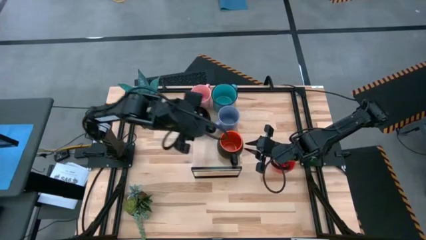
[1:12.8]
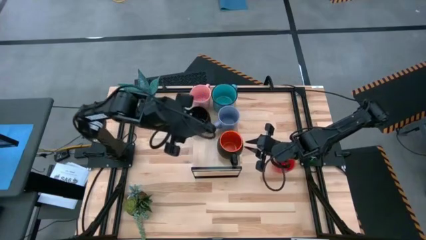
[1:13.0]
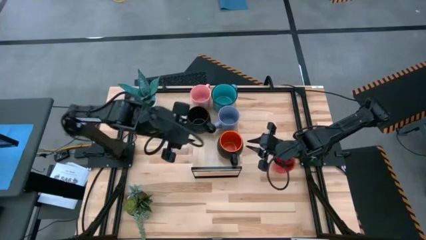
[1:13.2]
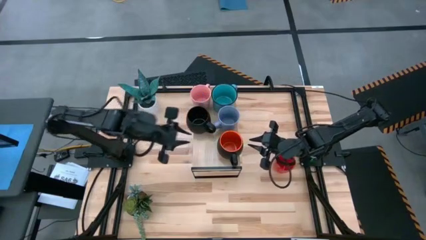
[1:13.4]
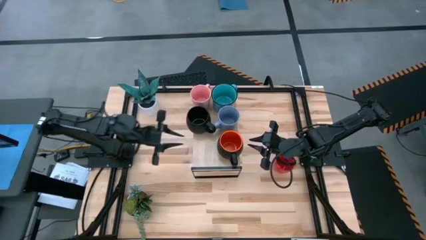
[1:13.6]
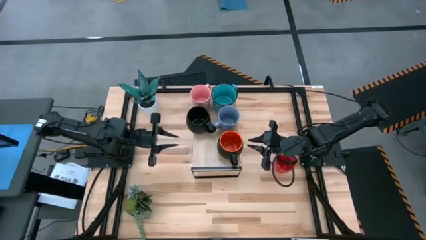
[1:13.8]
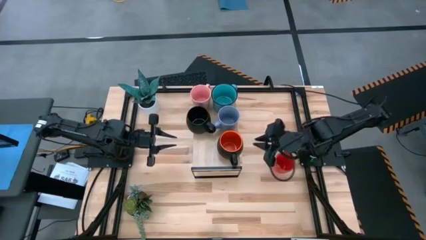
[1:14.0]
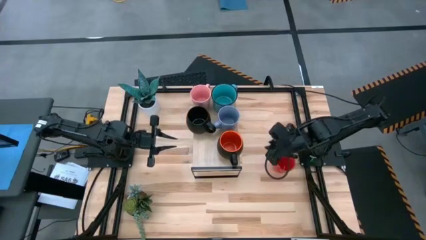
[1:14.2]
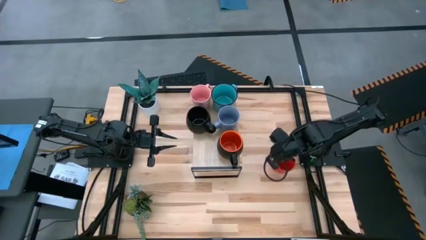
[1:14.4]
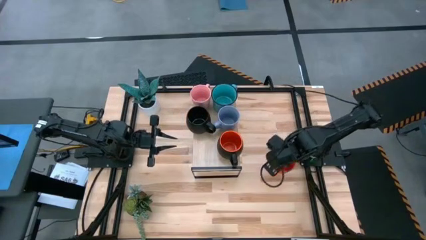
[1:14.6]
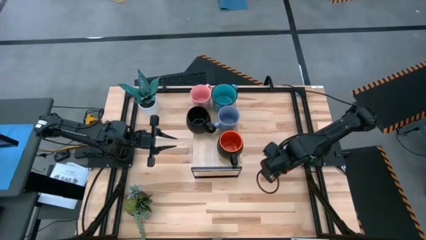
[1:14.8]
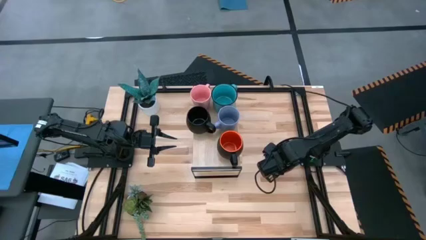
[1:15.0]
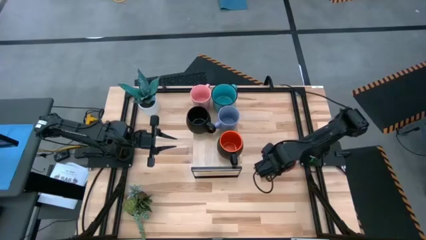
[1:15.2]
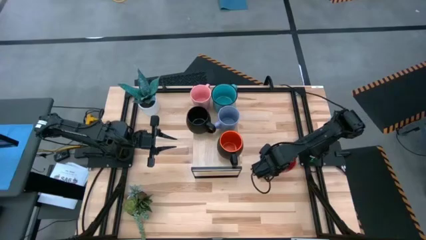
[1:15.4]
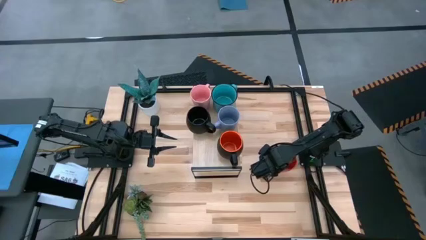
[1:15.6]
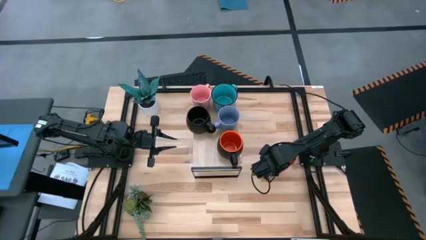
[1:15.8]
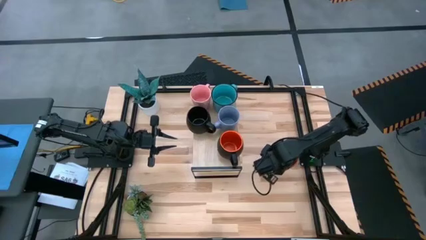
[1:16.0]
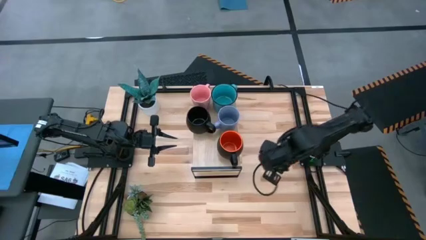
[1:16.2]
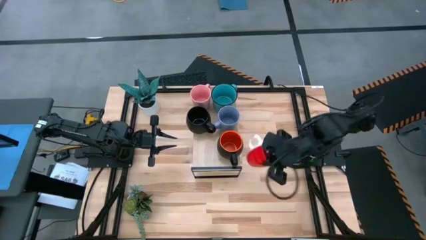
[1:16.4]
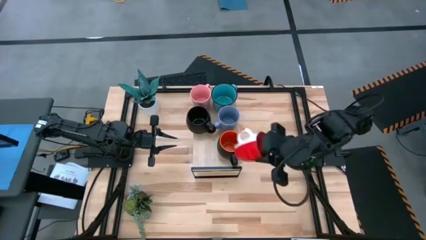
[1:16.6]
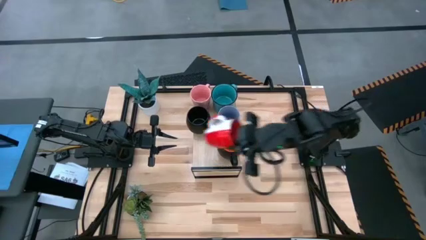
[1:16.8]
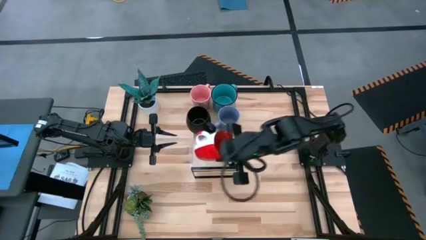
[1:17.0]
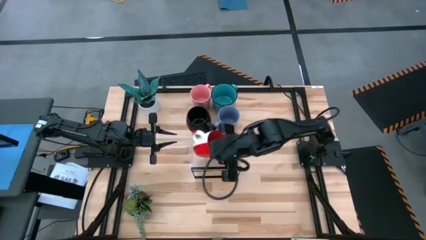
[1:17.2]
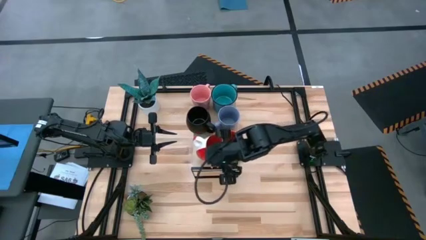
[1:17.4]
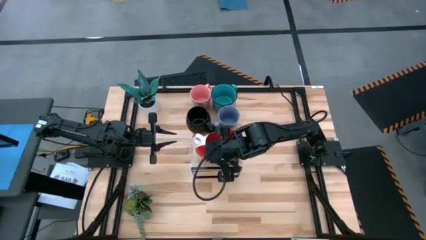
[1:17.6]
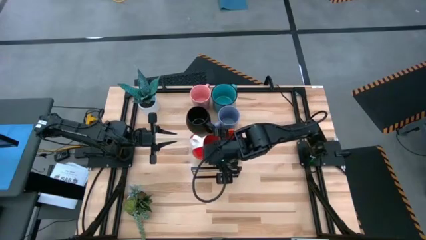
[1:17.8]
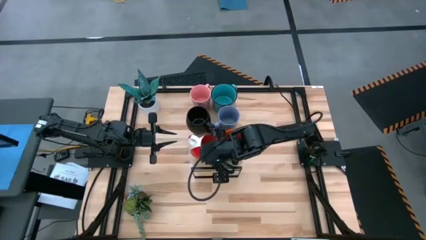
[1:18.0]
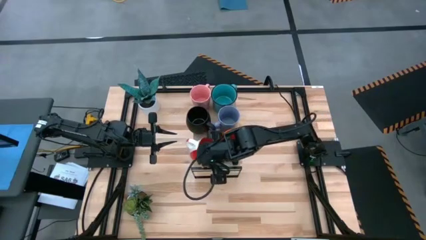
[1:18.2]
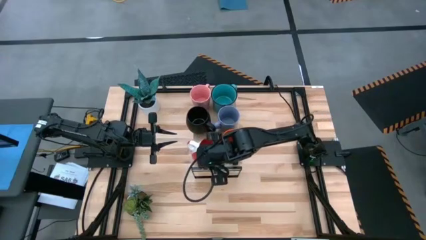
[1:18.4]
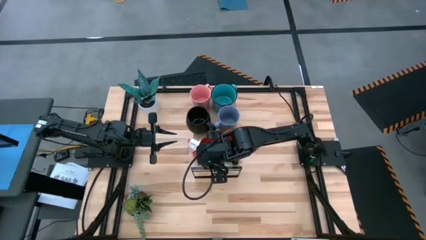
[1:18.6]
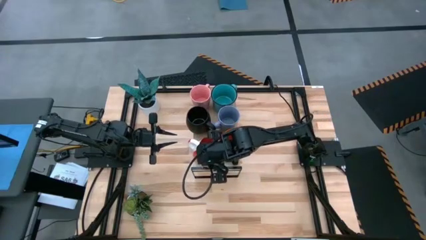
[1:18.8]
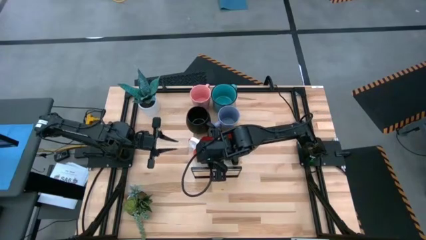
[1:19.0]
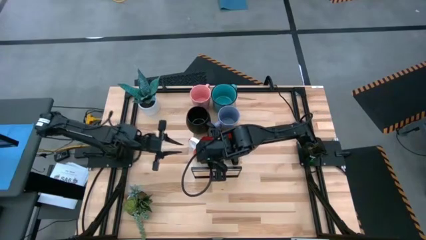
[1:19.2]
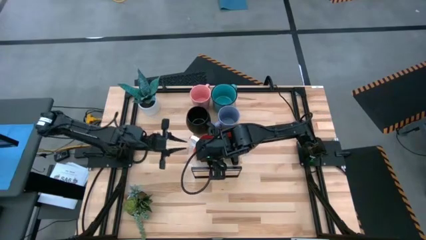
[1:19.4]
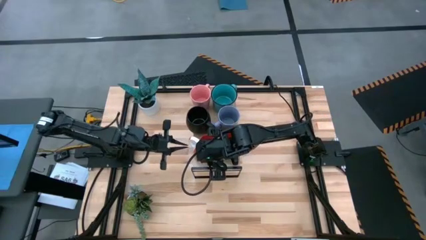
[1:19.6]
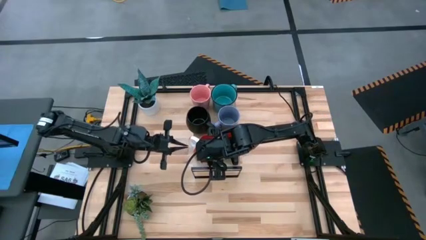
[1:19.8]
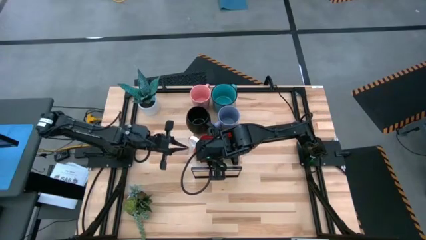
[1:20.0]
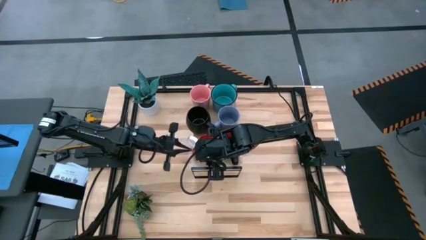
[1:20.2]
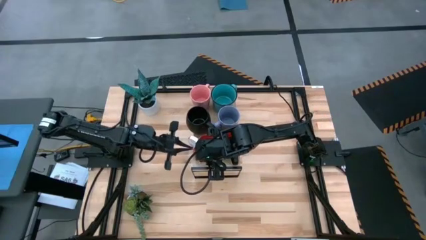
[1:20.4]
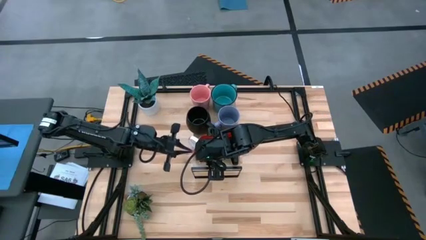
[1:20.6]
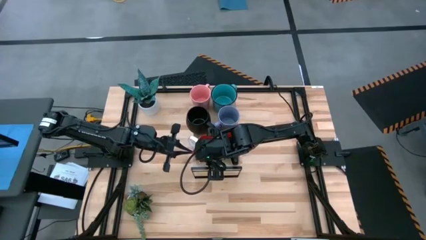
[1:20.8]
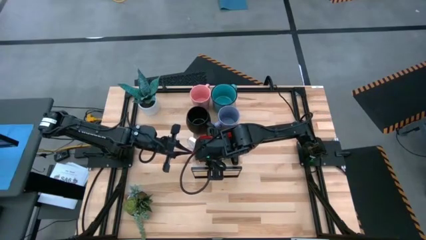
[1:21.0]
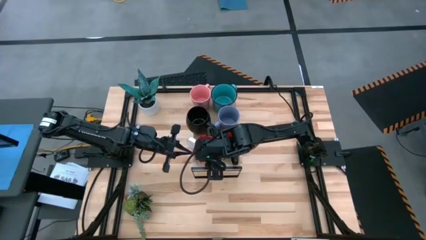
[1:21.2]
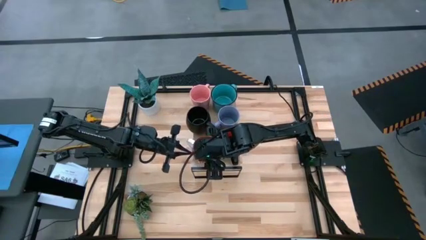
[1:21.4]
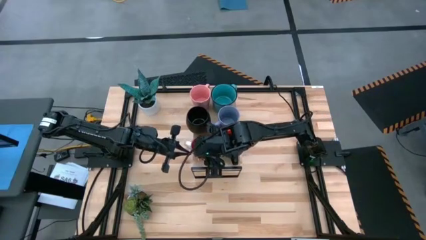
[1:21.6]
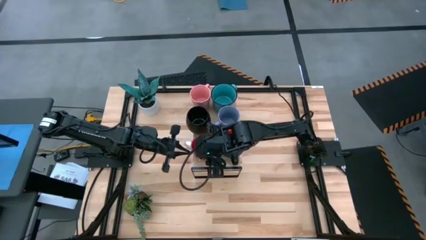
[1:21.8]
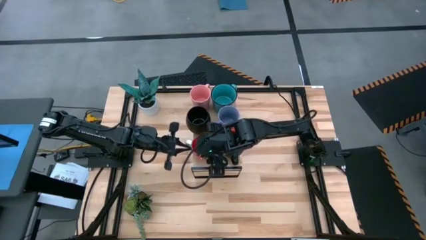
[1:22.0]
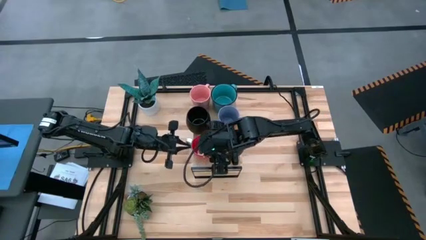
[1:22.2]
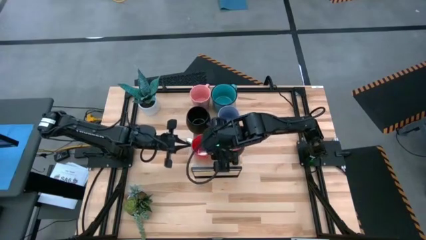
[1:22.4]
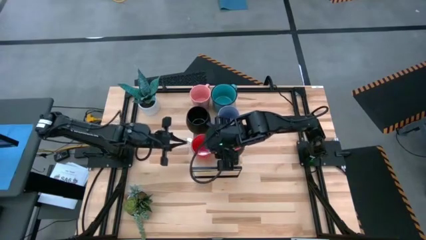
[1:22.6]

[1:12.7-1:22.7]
Task: Place coffee mugs
Put the red mug on the shelf
